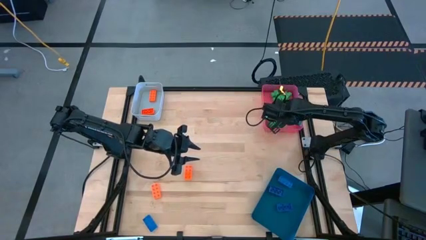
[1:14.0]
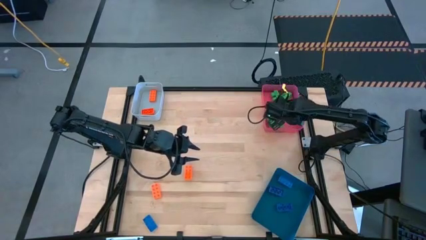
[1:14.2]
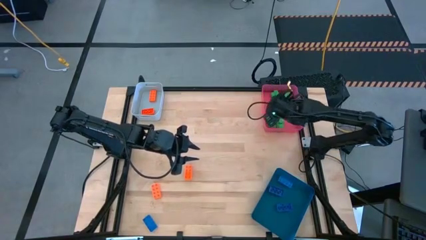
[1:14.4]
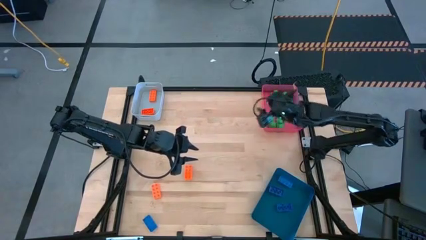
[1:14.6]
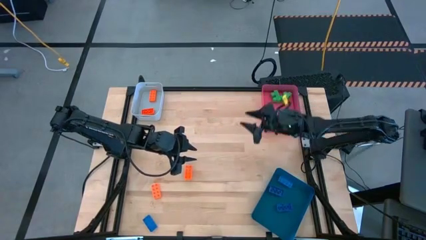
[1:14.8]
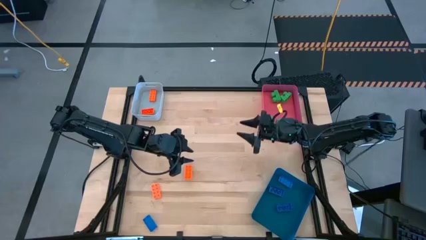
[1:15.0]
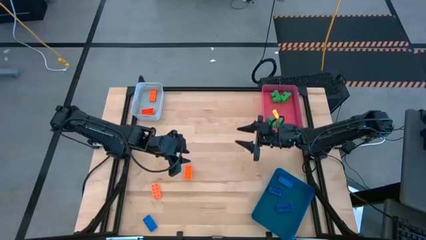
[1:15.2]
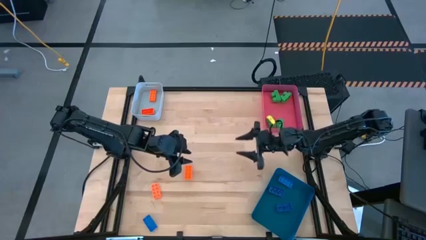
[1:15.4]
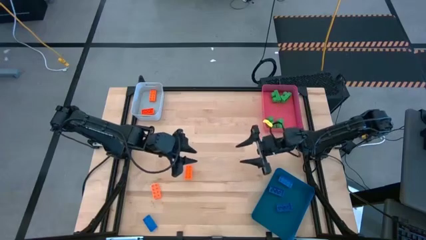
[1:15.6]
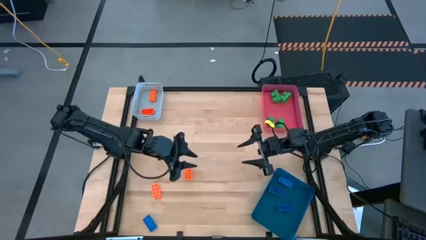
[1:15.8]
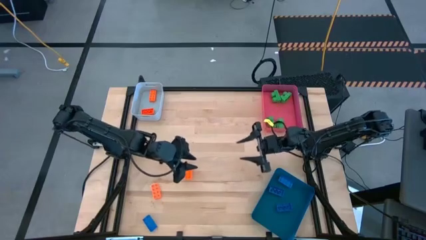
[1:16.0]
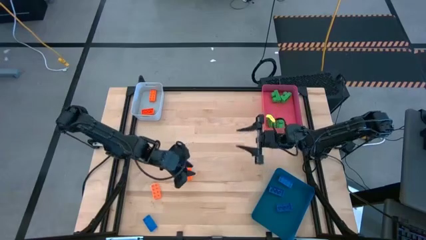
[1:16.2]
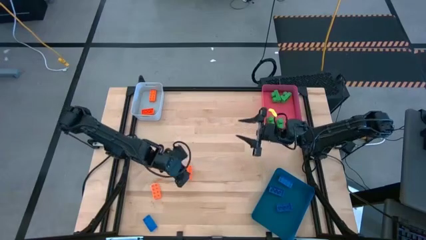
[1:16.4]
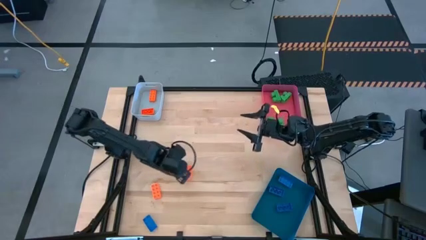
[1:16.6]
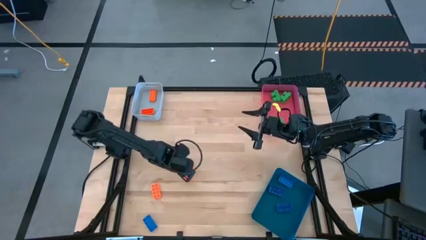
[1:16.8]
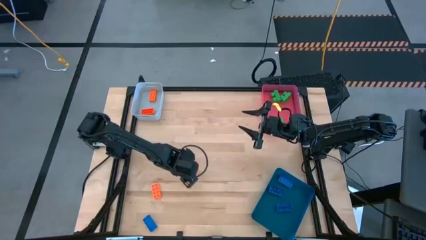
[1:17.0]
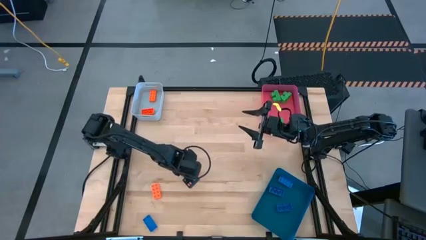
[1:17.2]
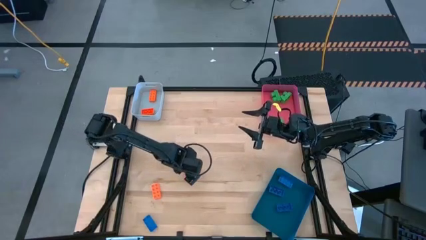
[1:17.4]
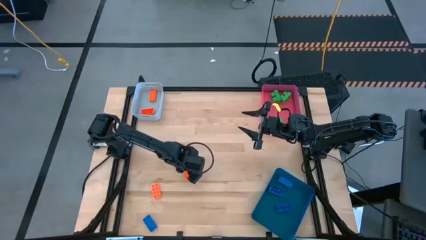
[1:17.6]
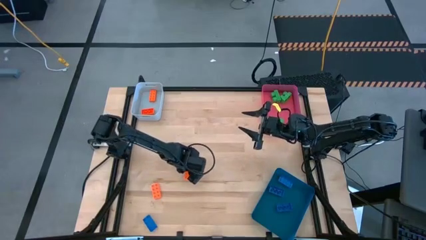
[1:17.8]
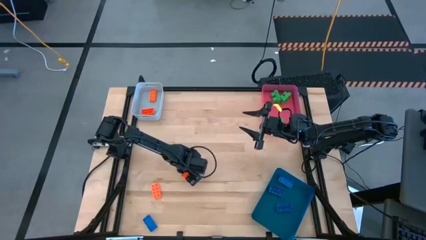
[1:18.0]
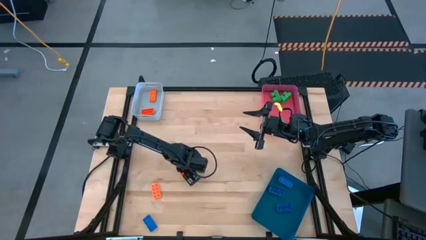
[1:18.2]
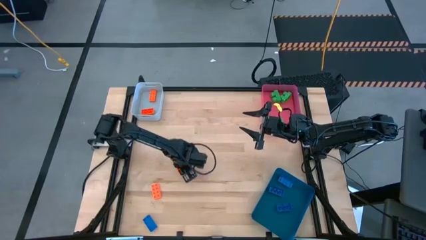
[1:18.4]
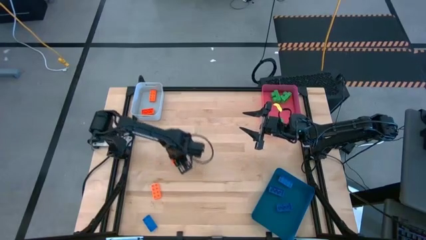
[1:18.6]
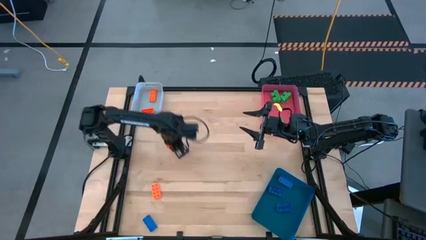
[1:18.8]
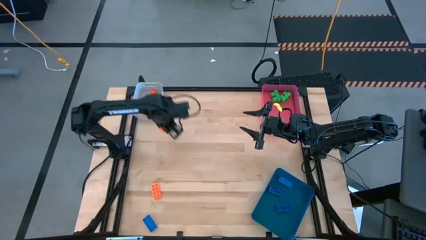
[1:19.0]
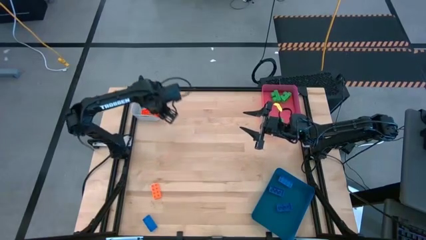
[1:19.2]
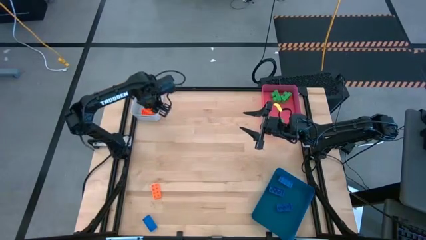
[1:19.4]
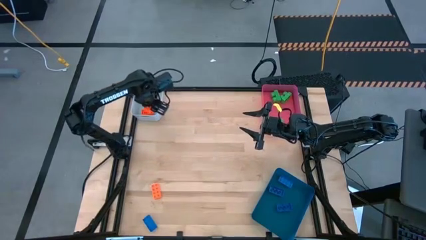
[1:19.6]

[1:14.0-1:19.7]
Task: Sort & place blocks by color
Put the orange gamepiece into the gray bin

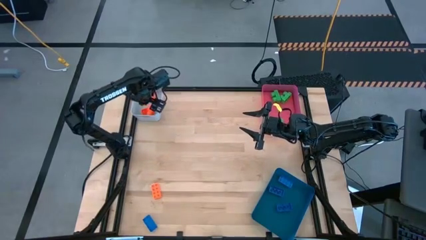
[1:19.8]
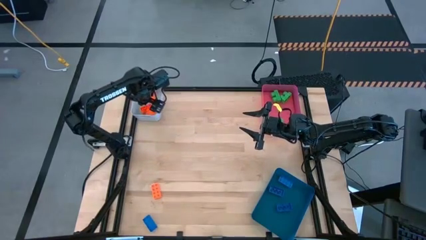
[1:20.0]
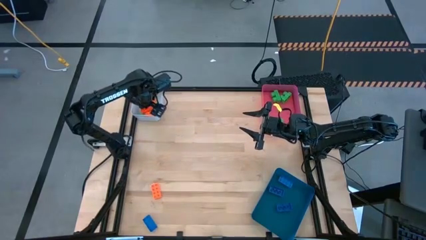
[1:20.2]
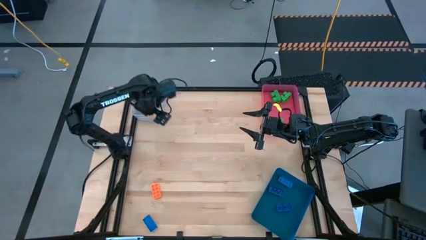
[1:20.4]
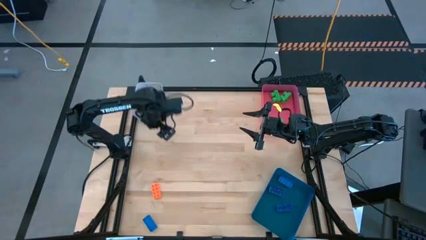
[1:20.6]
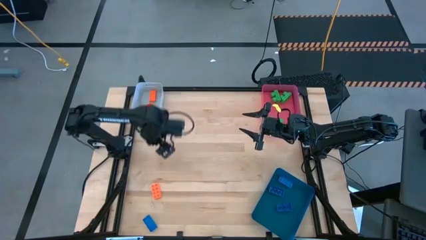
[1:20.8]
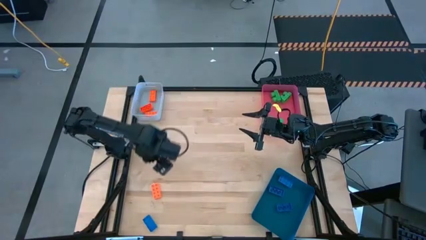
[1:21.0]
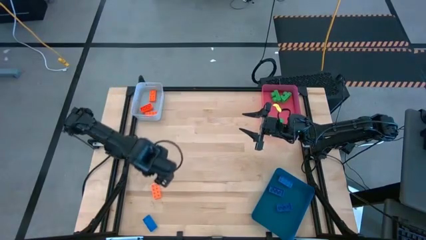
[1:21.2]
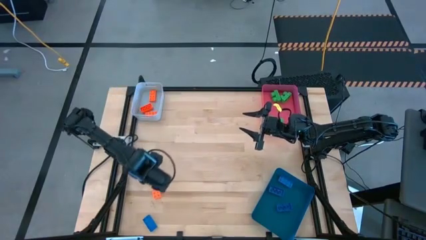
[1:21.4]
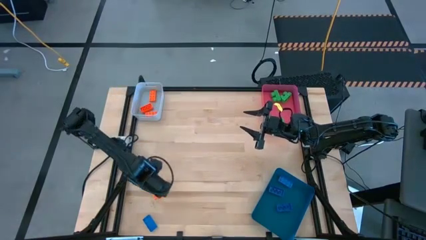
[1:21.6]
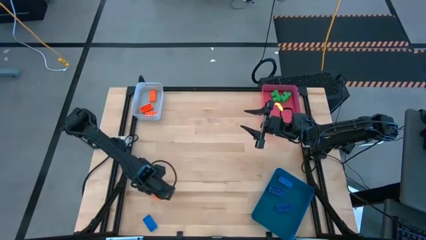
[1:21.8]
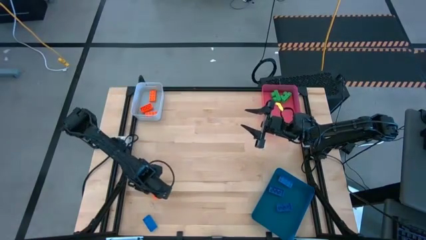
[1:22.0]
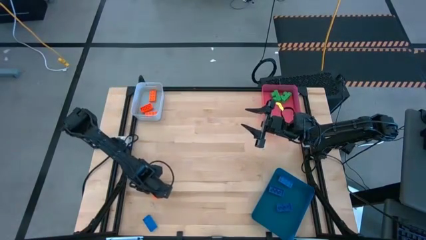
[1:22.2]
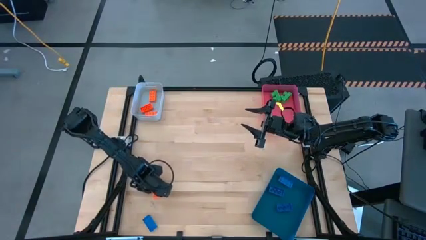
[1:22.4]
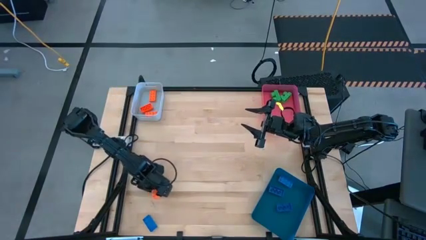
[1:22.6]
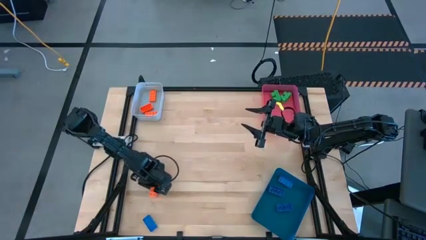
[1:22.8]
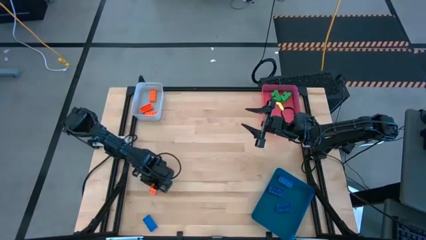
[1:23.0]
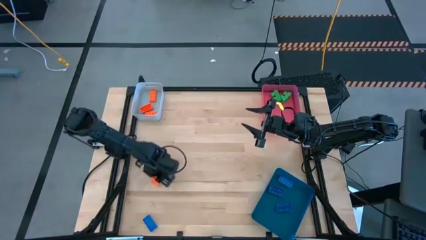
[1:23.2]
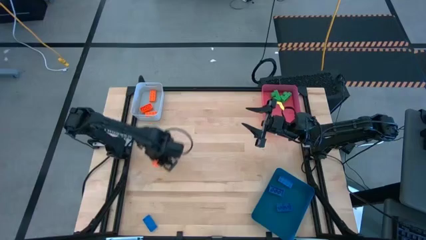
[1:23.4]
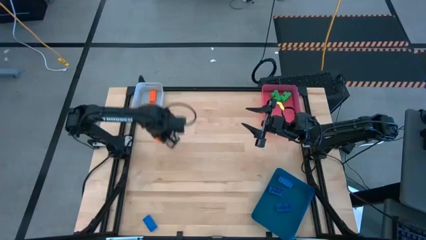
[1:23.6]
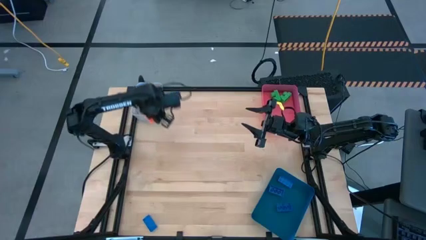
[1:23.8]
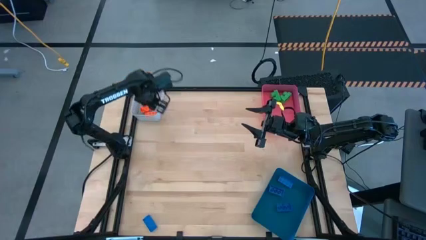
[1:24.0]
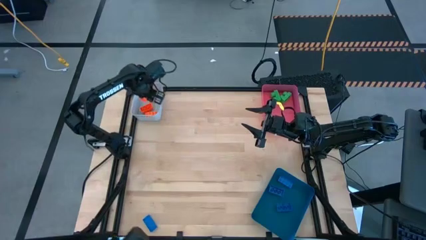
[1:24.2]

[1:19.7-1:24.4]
Put the orange gamepiece into the gray bin

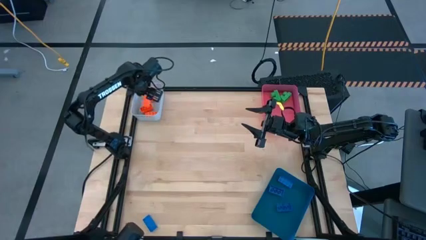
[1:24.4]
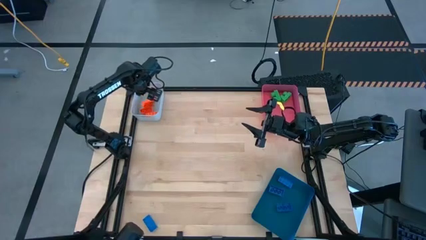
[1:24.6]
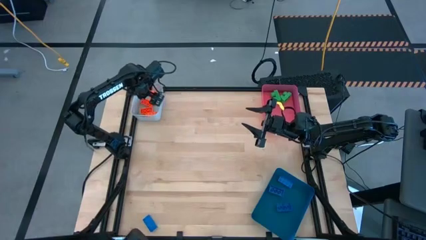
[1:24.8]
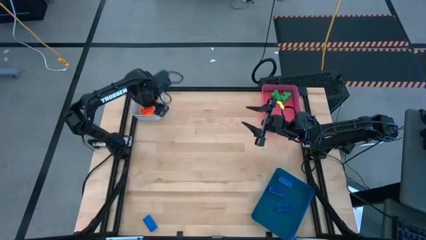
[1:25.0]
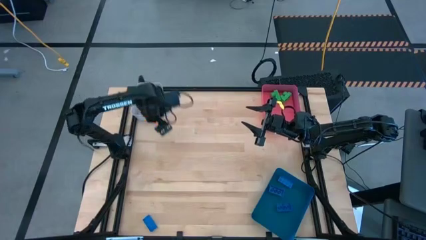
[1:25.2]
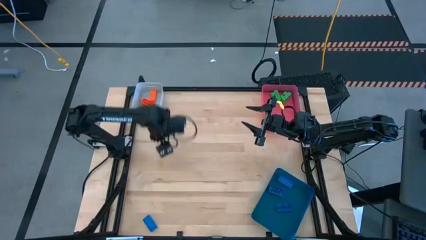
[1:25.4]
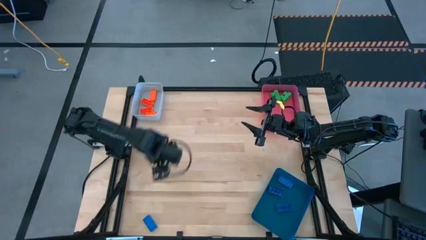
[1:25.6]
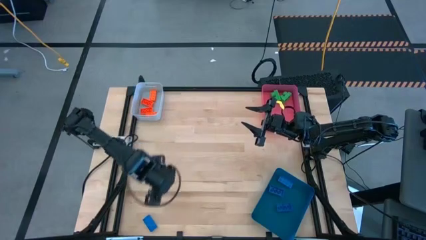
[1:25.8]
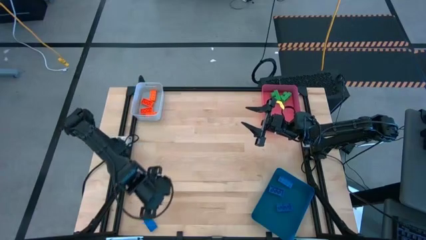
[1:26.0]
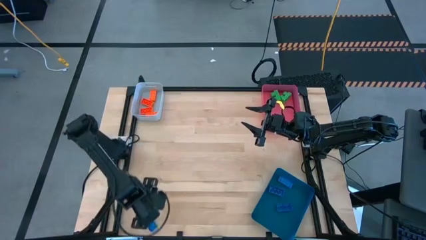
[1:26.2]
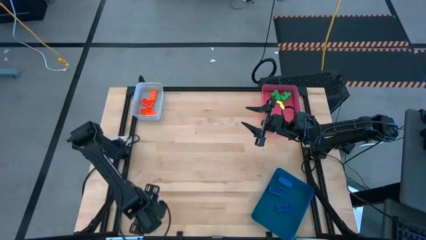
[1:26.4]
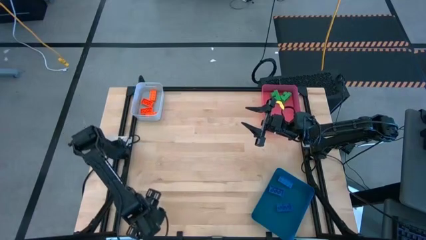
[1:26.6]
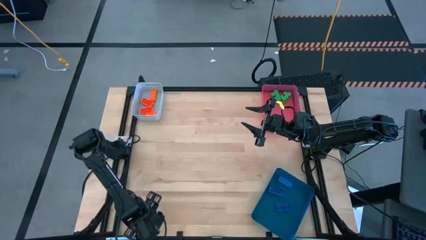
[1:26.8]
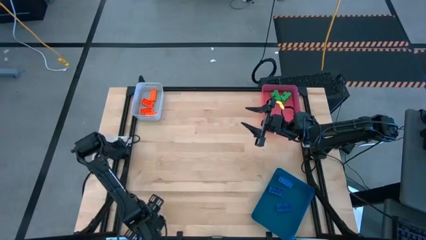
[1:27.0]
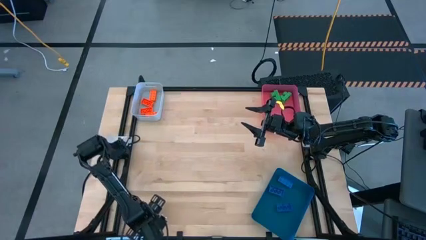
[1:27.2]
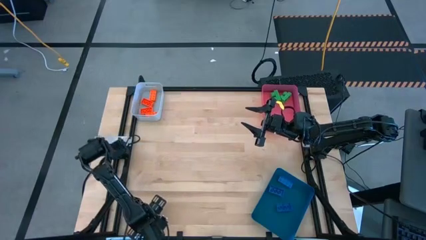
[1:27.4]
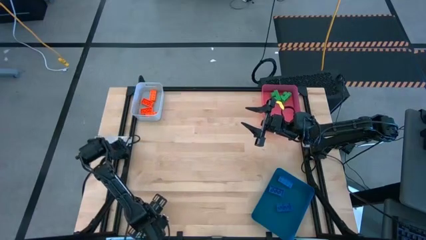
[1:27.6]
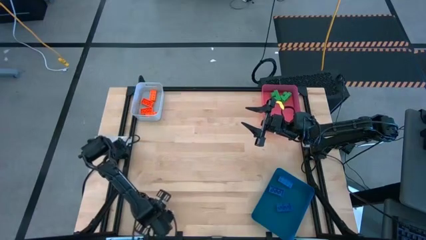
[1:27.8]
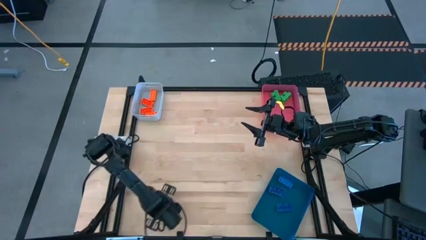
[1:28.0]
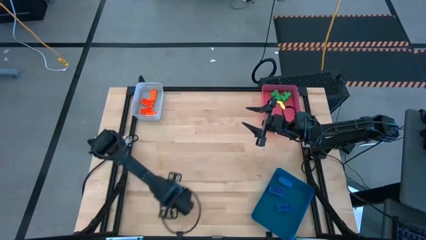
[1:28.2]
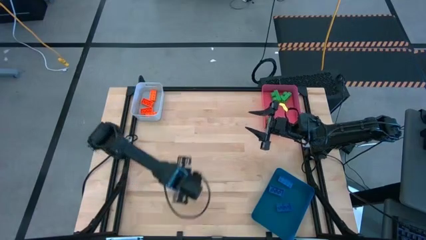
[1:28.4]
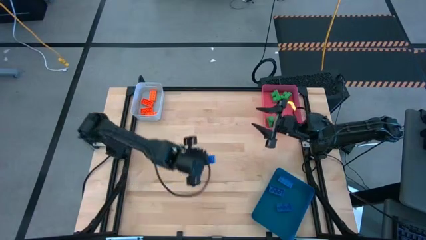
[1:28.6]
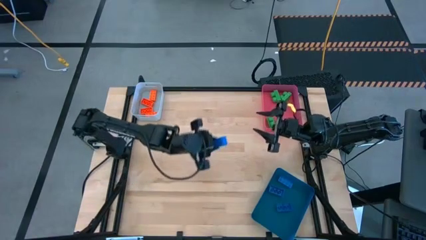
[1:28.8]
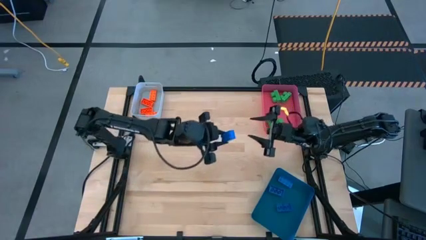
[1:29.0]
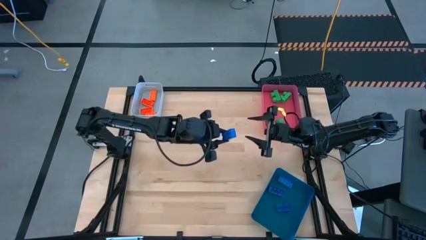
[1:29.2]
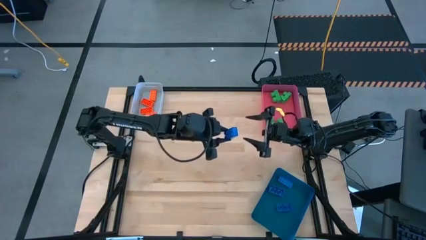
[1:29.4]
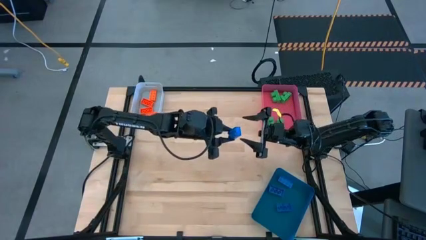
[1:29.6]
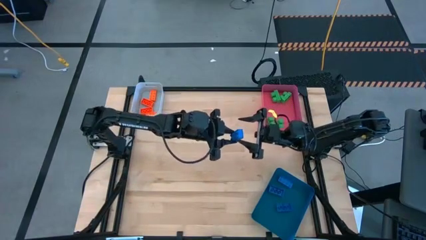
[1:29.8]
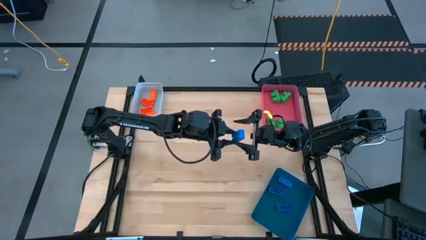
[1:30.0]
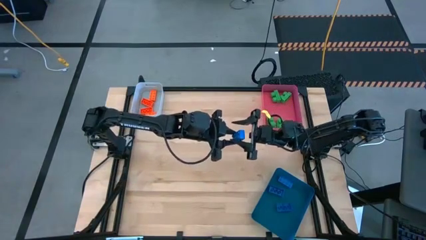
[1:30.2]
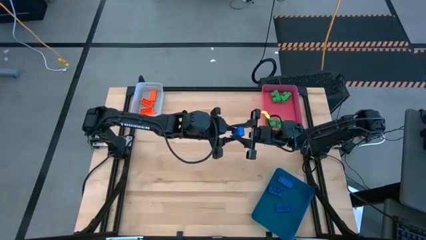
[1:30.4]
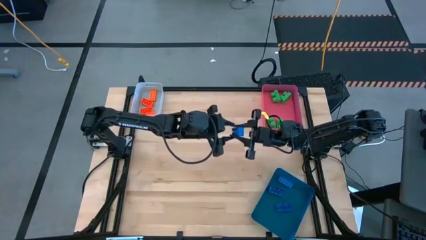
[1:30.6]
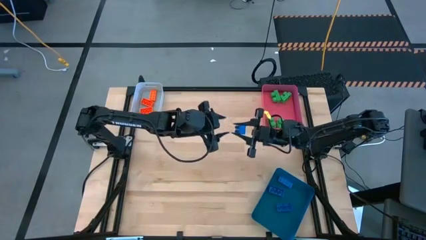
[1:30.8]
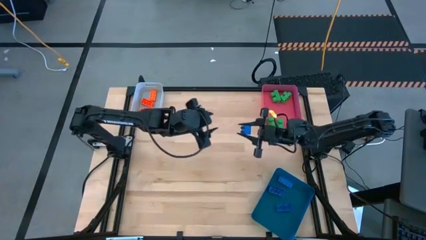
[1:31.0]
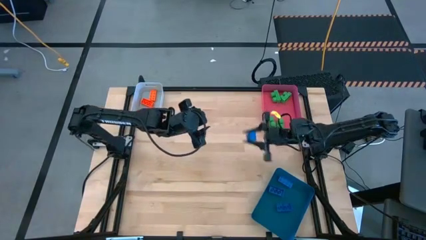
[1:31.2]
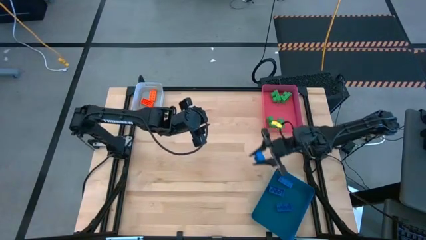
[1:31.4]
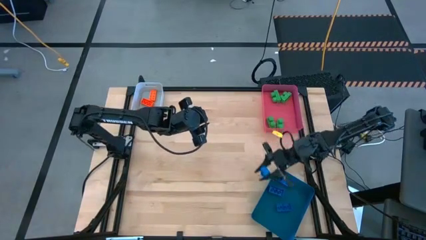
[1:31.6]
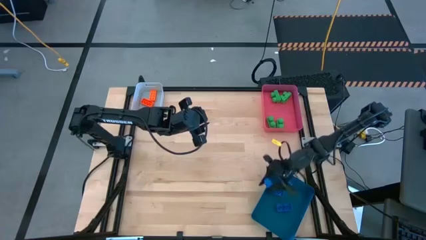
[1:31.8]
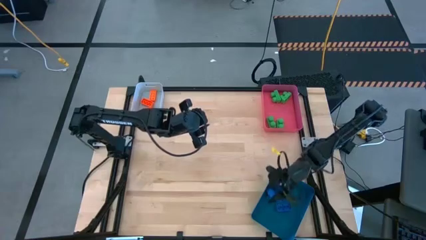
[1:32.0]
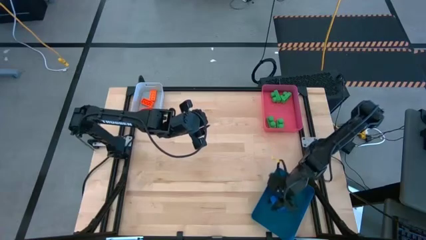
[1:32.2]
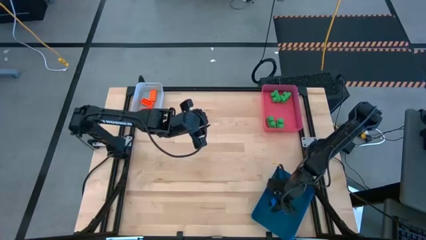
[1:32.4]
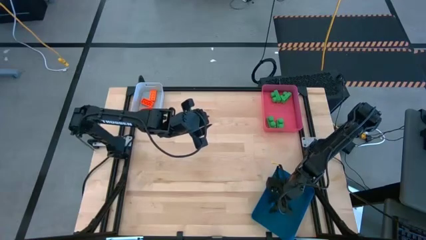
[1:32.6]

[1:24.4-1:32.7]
Put the blue gamepiece into the blue bin
